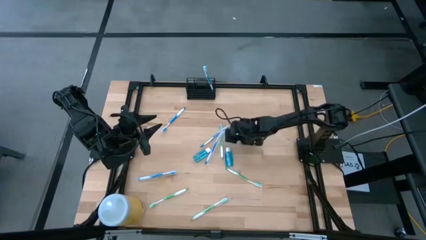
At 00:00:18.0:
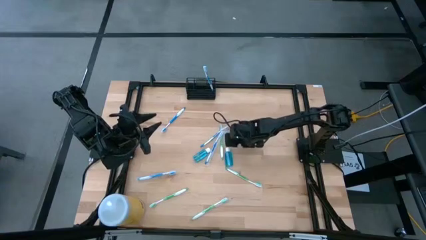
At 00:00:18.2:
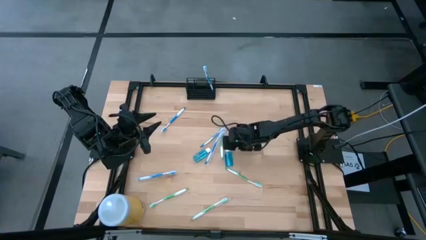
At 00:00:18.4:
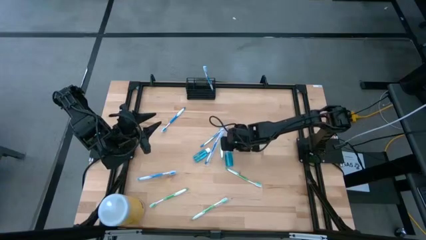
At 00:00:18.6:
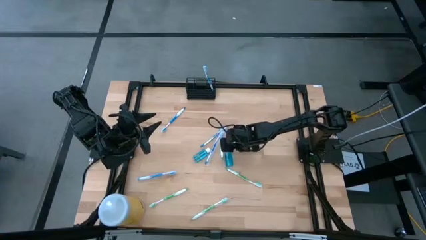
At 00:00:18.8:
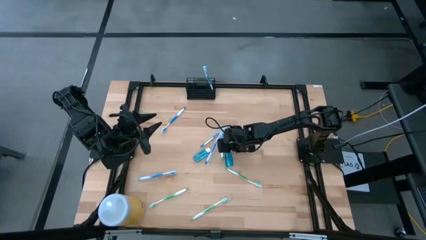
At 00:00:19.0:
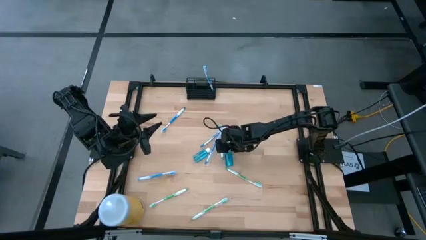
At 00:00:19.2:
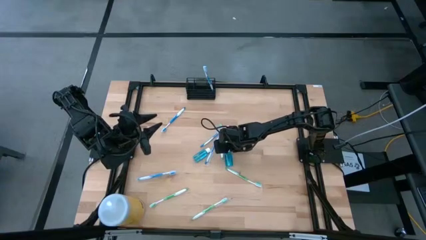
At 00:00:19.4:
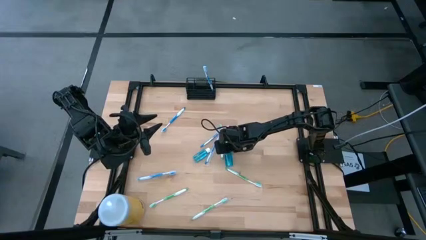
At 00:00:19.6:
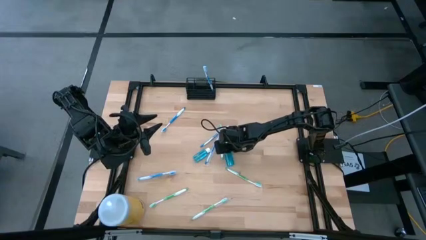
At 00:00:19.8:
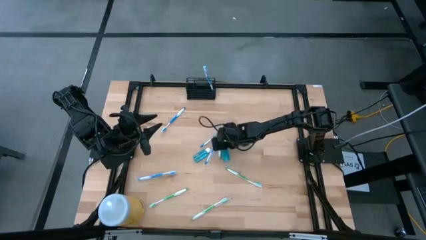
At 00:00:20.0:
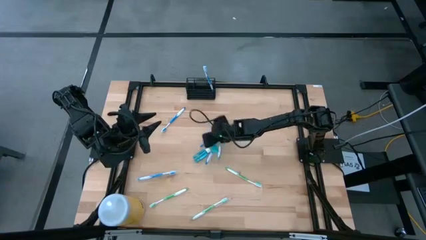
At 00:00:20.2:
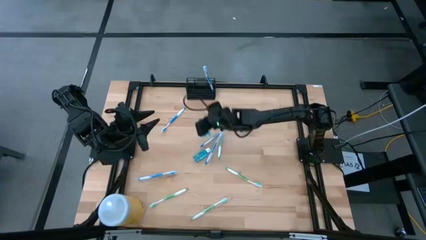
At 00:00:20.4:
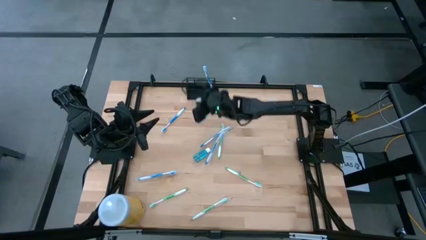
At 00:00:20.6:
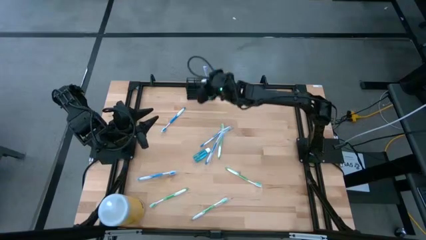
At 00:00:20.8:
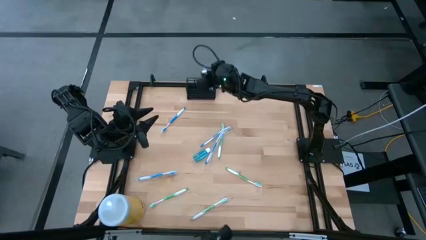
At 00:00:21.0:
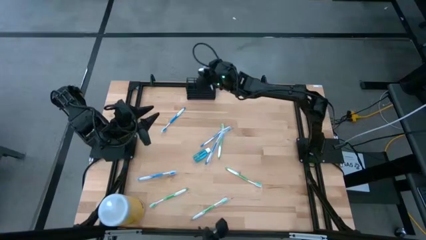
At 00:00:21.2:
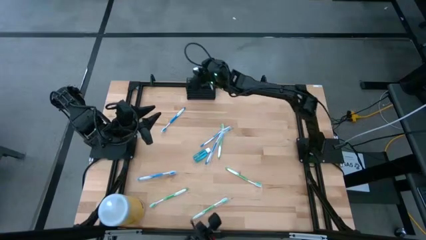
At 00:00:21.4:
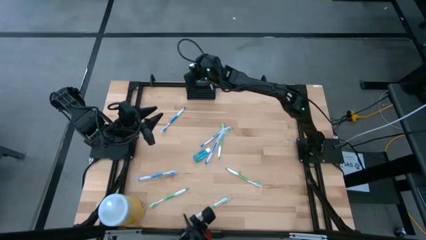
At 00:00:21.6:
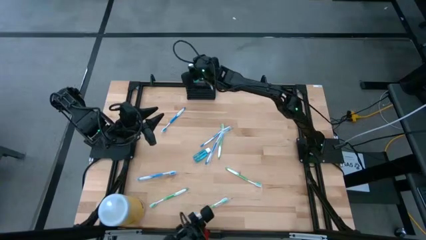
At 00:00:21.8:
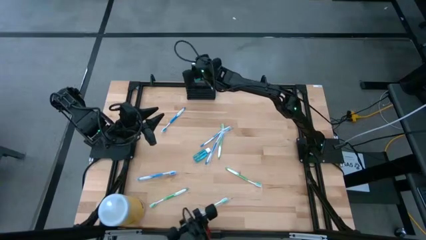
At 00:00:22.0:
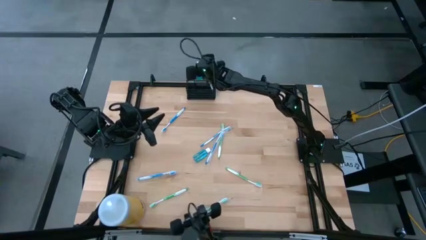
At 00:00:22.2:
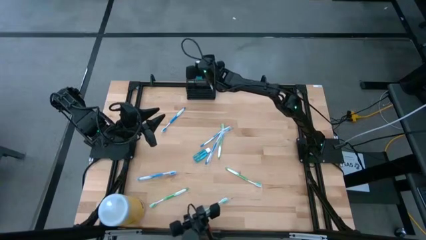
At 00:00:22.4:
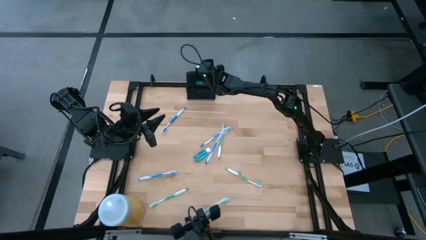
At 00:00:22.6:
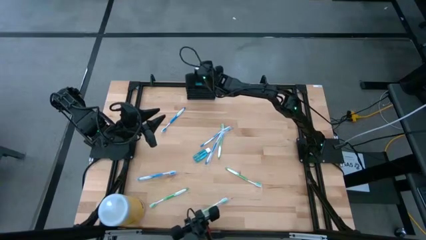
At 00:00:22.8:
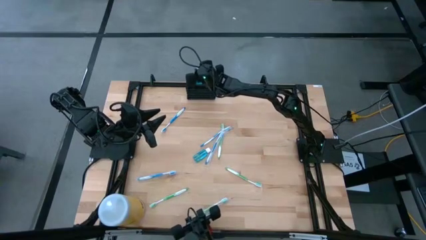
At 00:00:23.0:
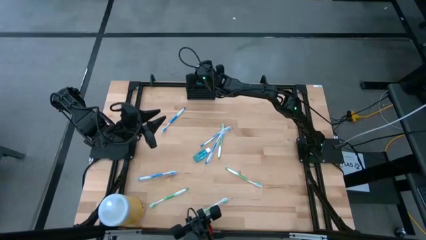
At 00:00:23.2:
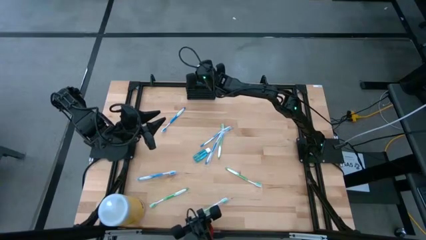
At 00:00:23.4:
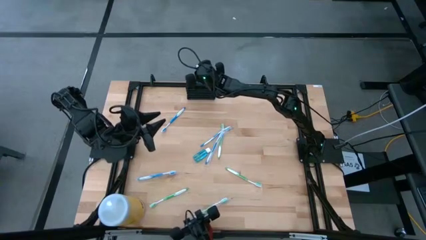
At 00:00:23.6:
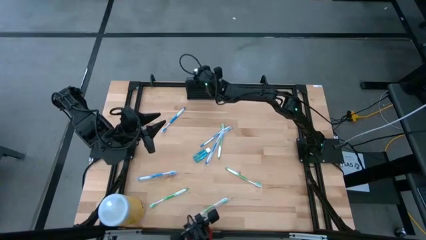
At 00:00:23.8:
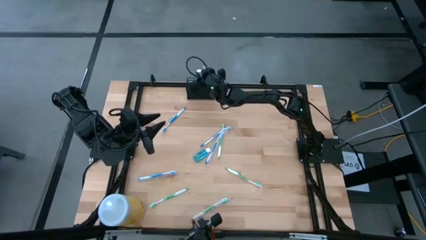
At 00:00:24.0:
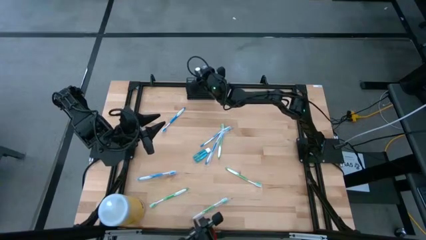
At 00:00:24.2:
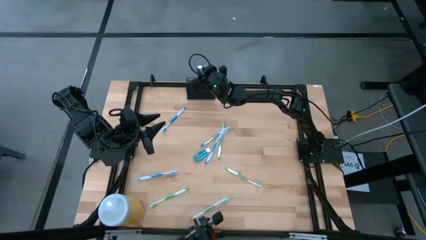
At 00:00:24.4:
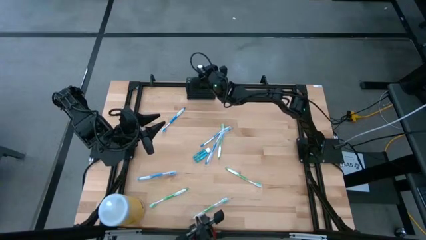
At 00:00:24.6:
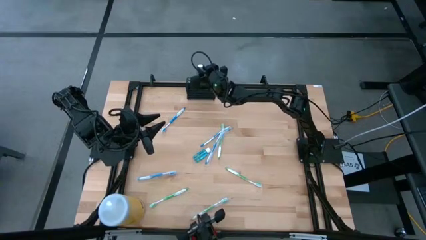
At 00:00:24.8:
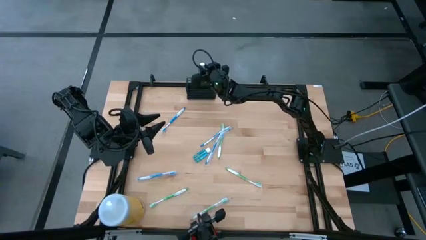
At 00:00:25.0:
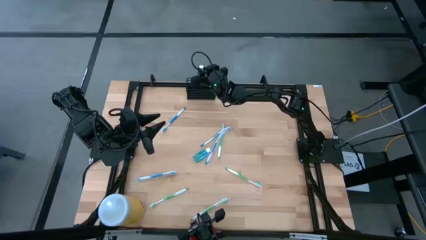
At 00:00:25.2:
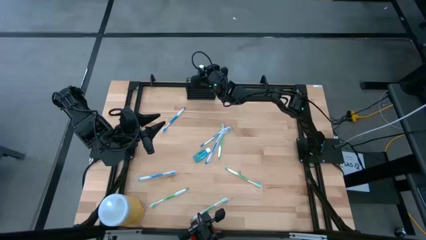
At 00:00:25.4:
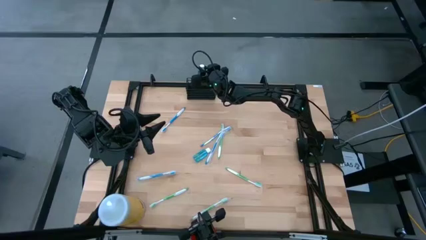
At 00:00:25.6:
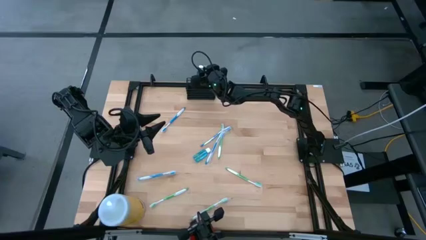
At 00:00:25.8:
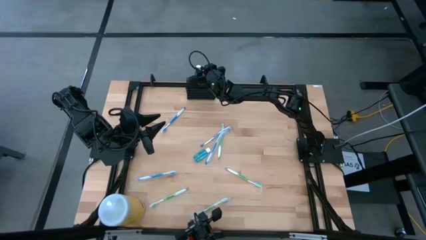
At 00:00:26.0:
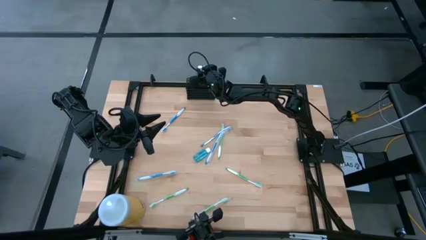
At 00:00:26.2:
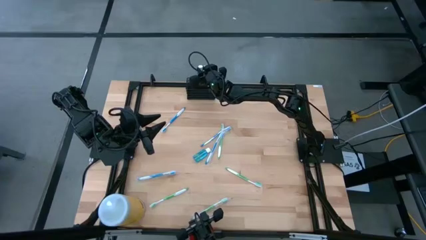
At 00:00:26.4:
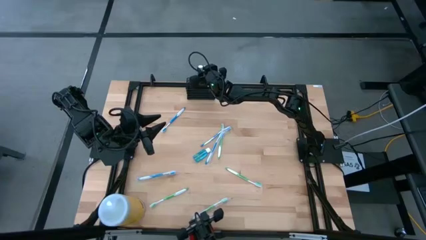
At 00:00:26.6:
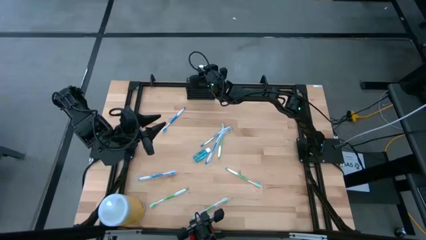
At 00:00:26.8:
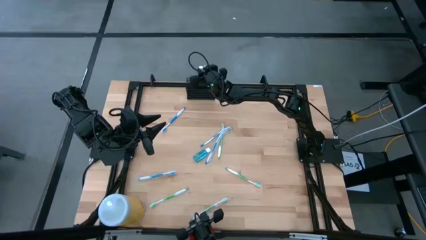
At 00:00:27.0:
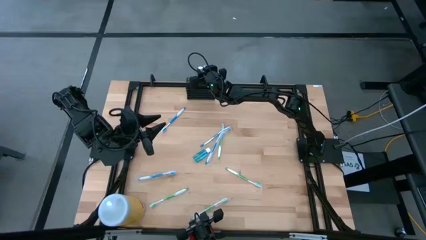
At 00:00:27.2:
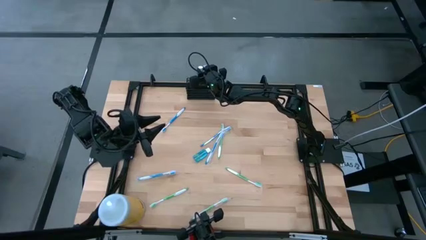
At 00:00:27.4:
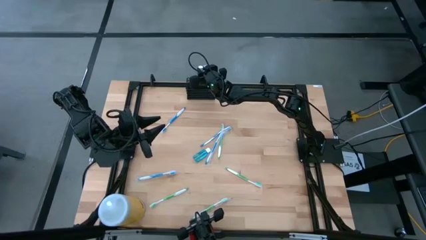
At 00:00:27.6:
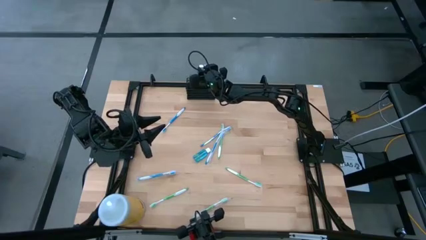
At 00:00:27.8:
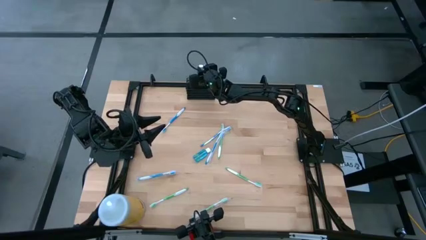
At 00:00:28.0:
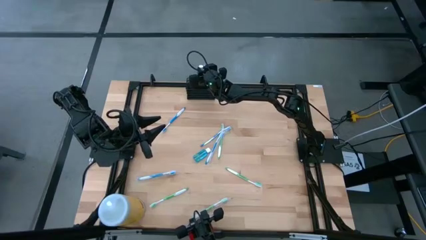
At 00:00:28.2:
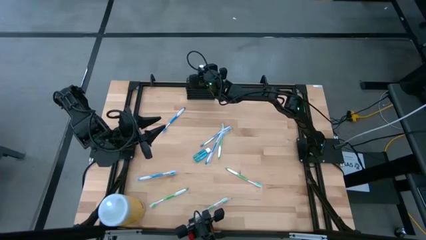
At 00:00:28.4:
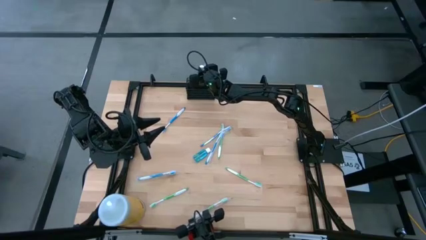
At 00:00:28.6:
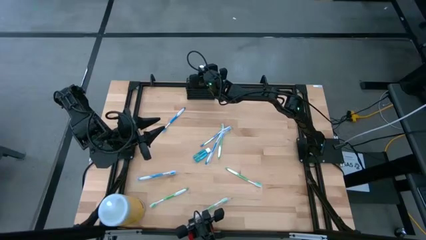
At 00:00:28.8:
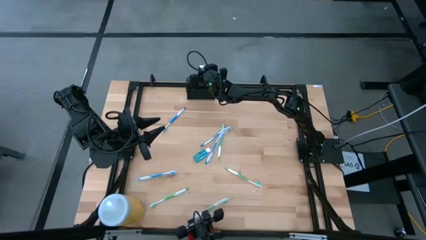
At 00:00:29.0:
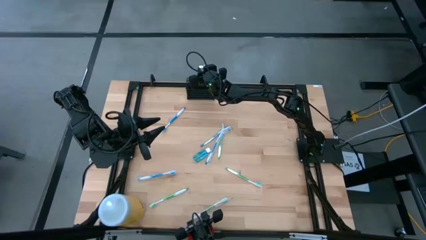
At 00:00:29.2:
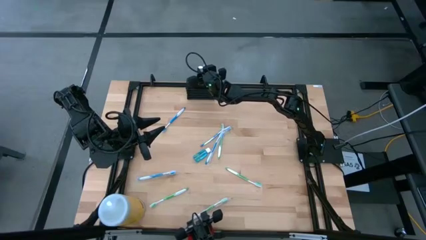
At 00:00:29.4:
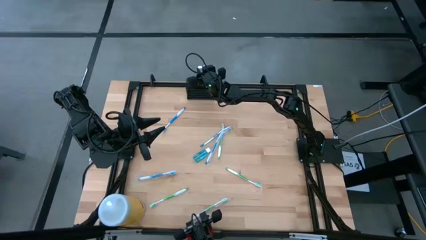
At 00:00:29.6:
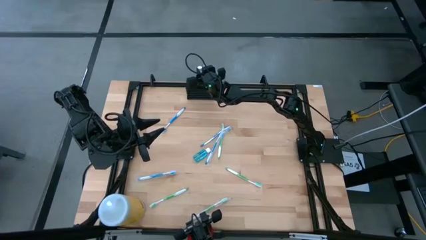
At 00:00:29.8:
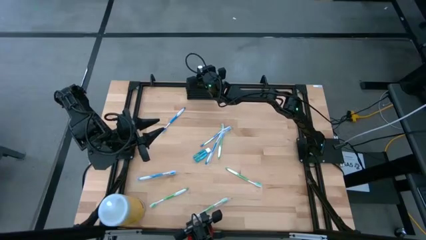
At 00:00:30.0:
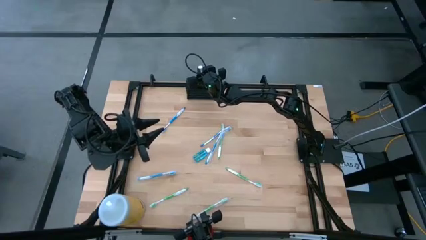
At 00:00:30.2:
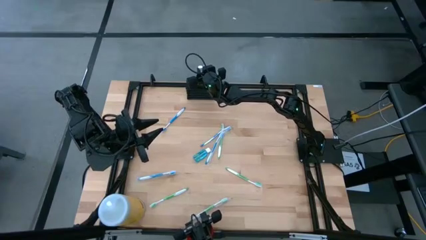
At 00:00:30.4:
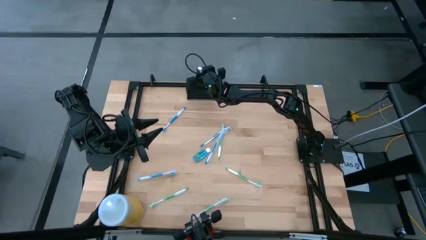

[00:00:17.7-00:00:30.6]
Task: Pick & Place toothbrushing station
Put the mouthwash into the wire organizer
